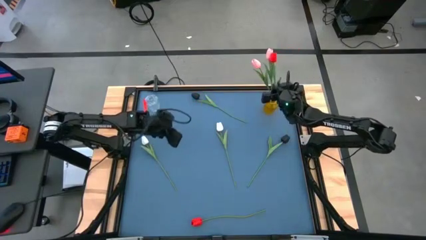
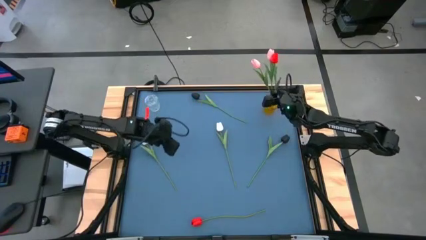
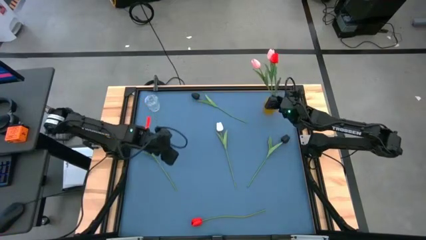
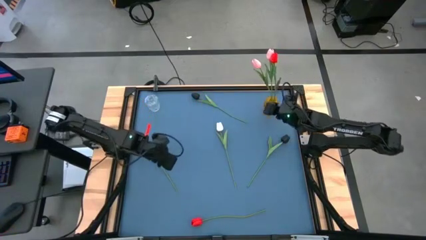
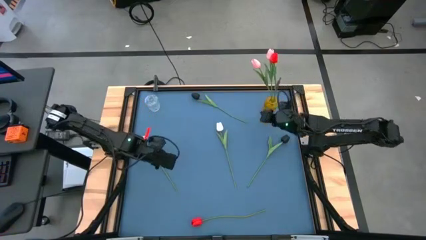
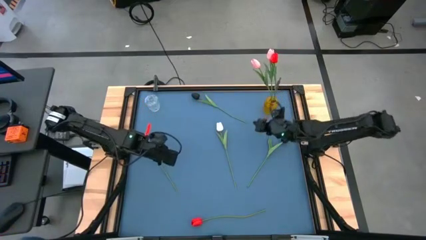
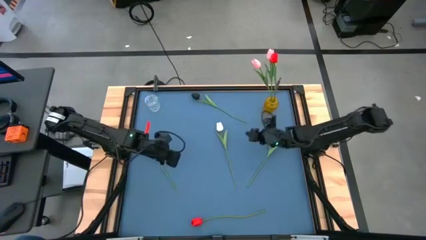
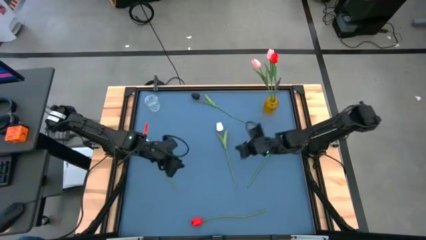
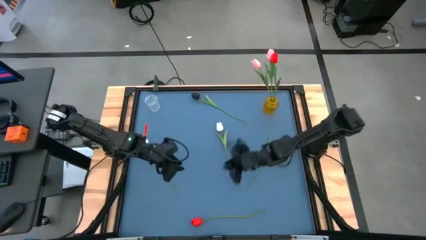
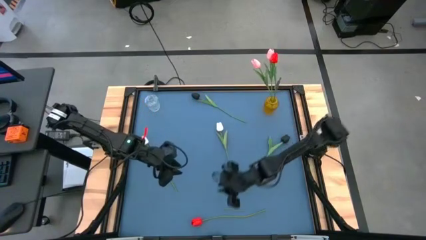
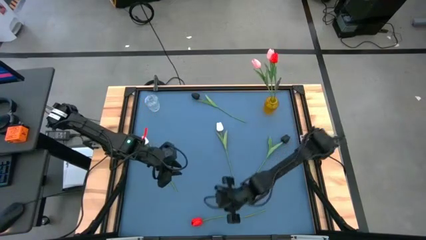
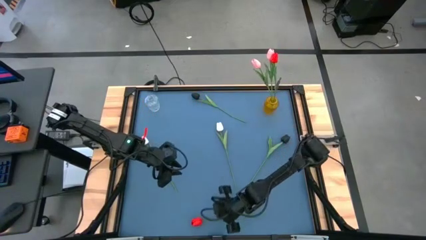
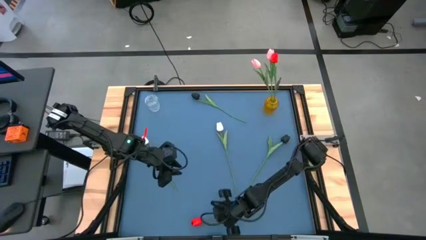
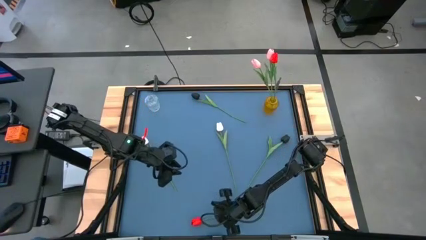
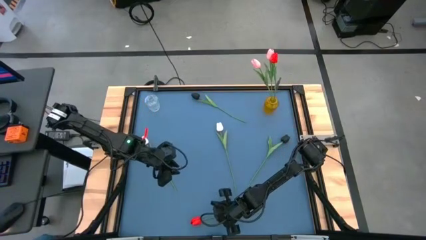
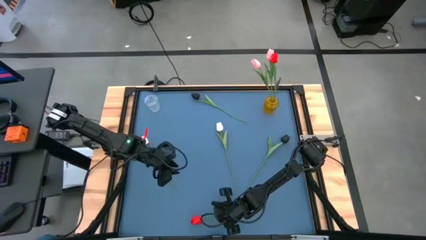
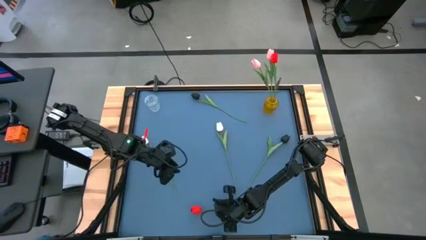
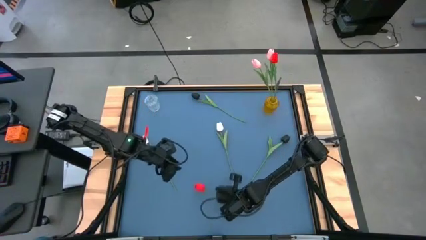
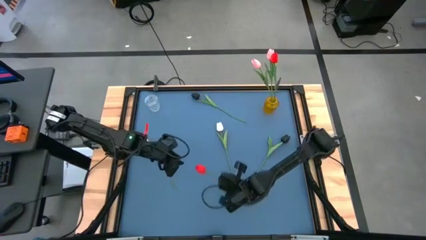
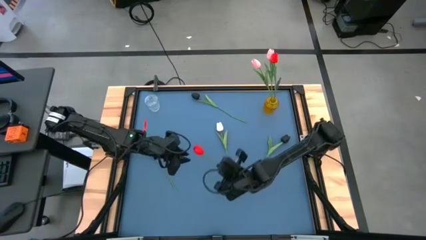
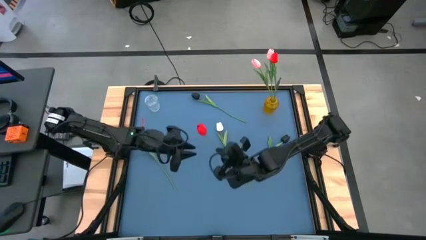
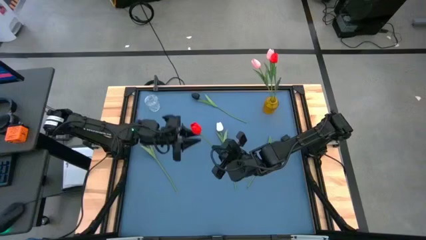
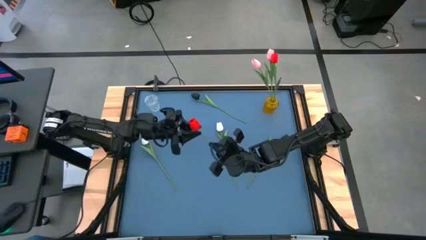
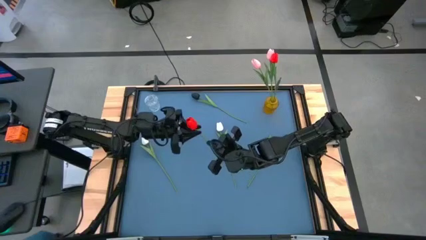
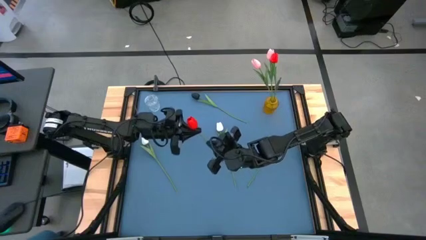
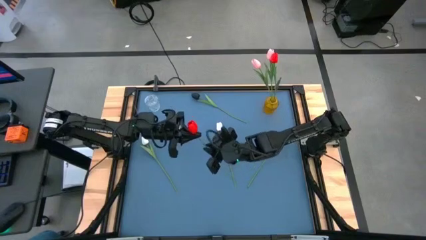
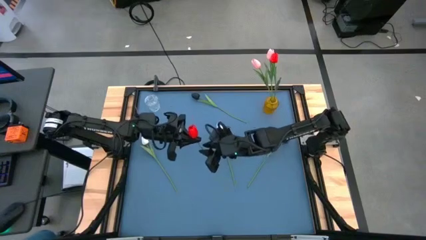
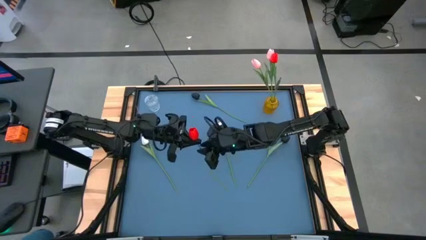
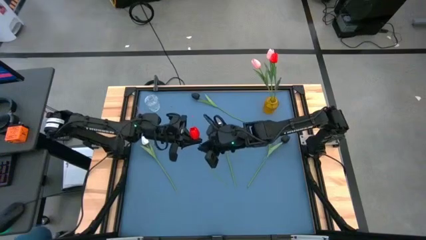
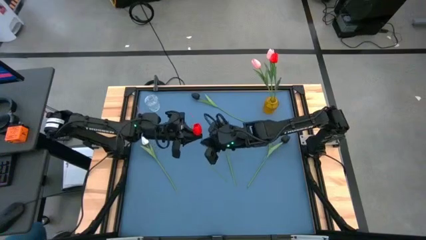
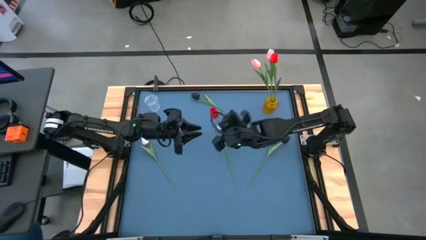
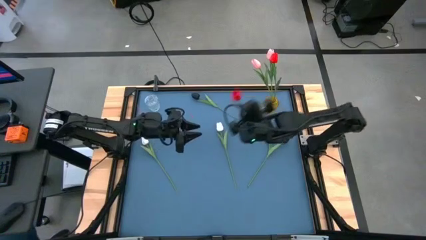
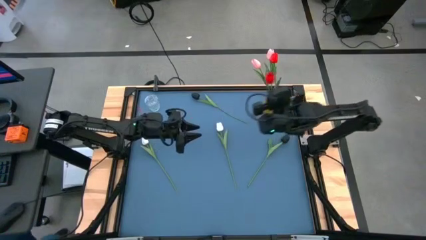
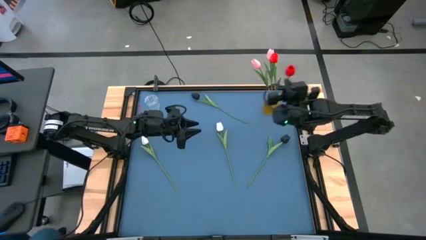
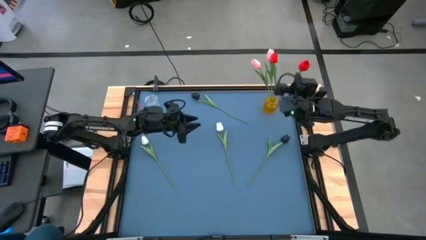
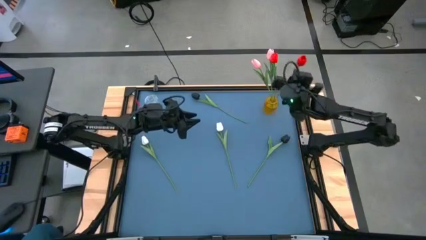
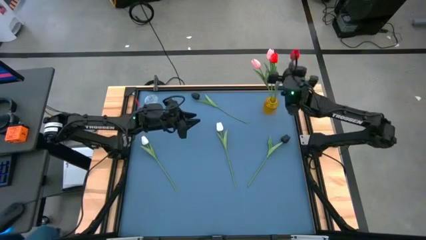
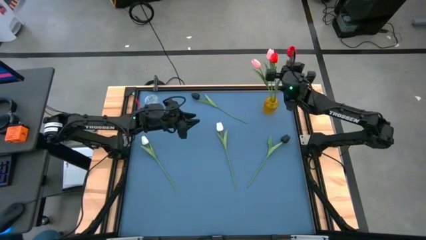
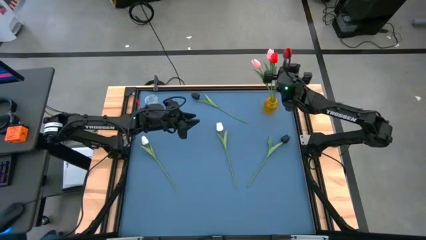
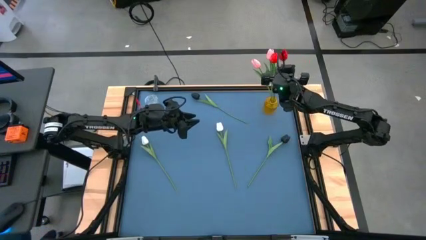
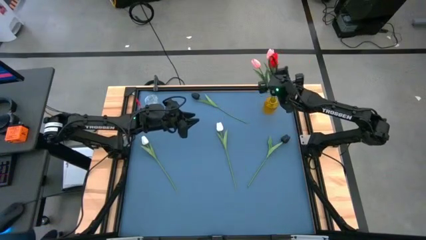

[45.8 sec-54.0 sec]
Task: Sort flowers into vase by color
Put the red flower into the yellow vase

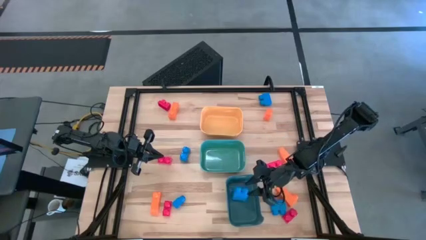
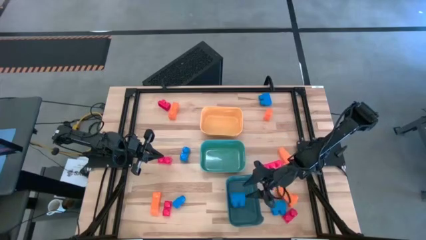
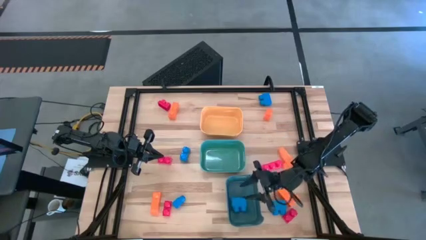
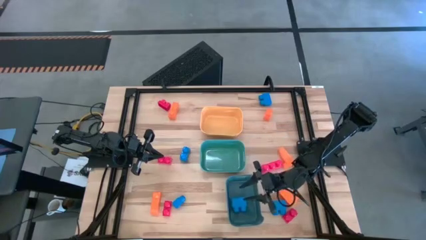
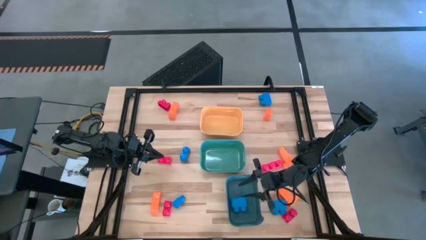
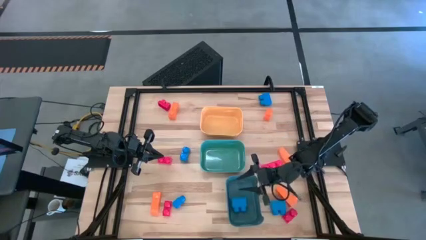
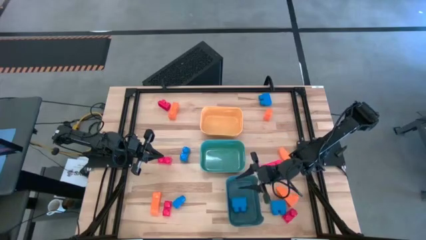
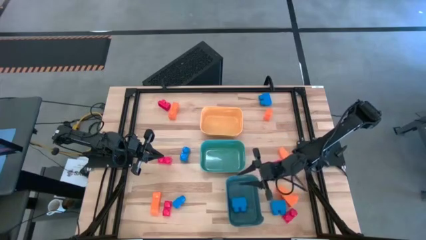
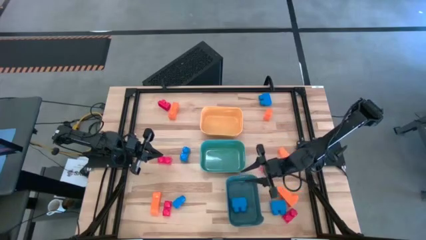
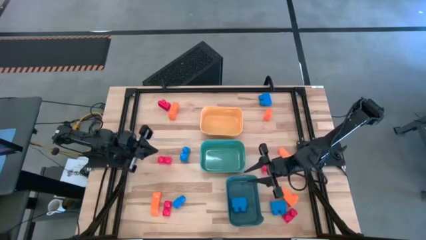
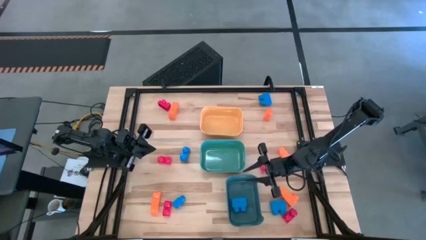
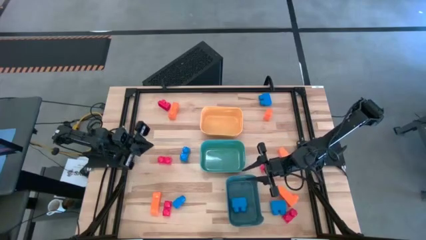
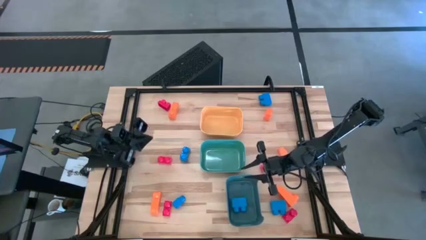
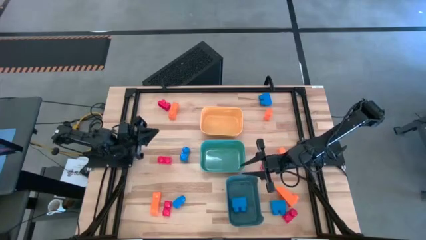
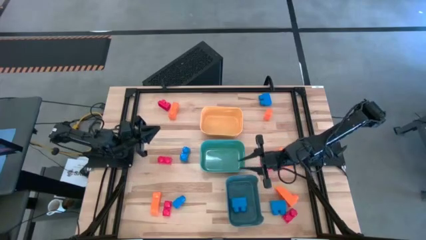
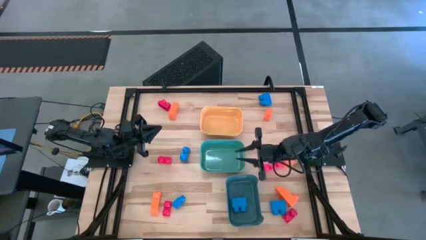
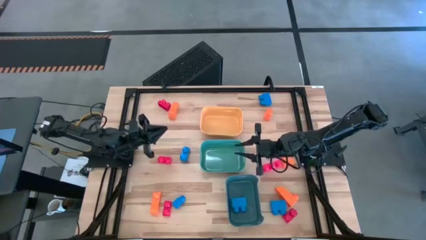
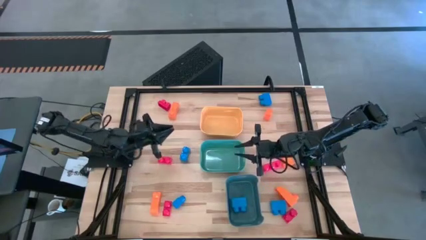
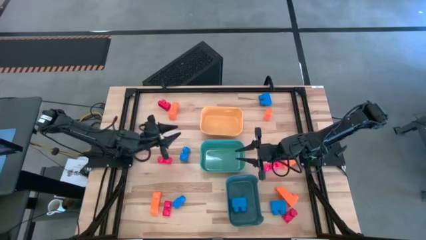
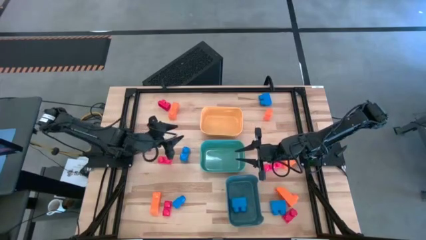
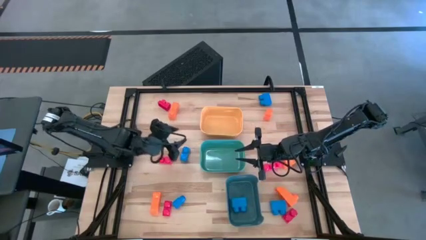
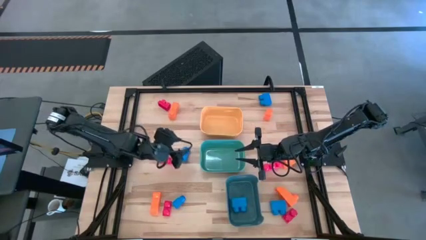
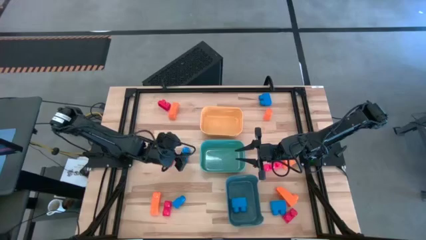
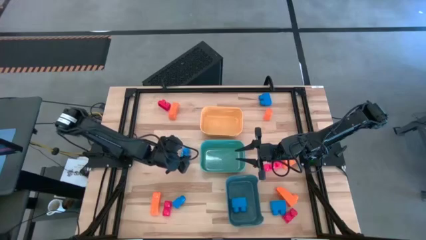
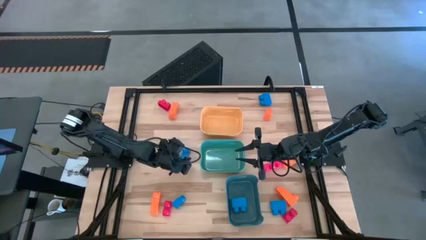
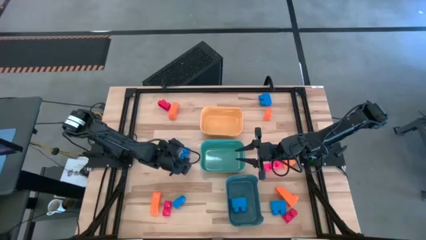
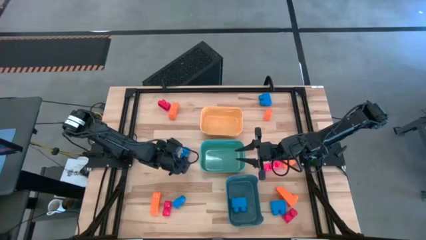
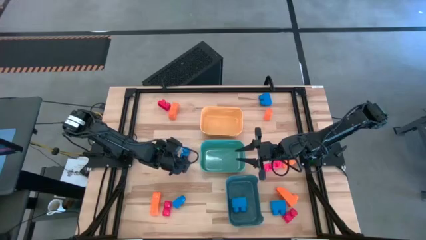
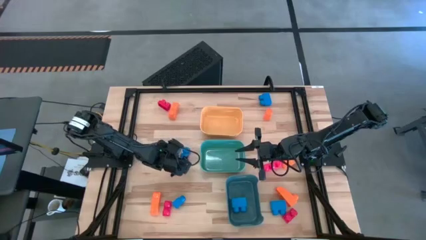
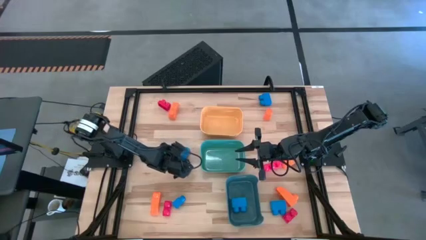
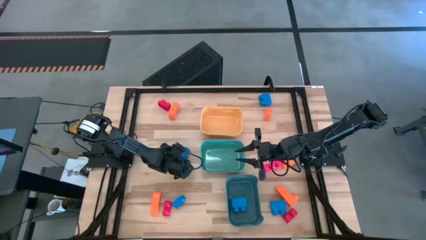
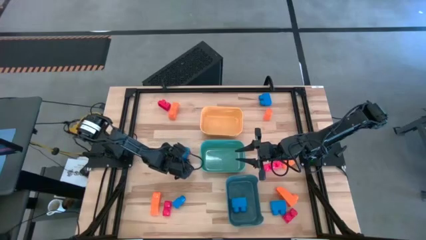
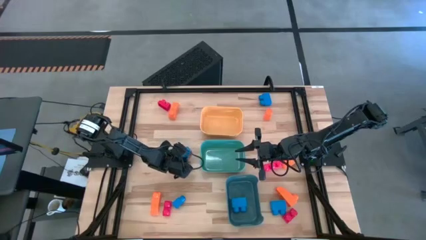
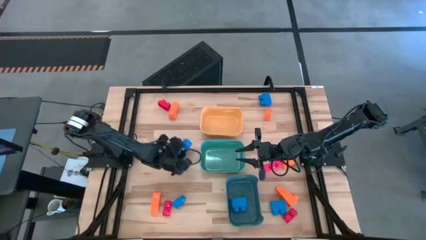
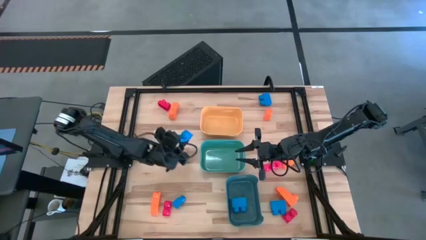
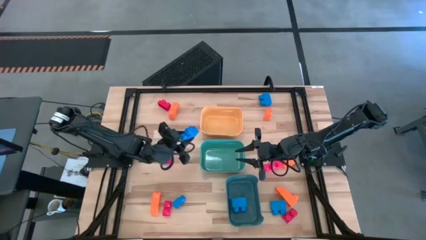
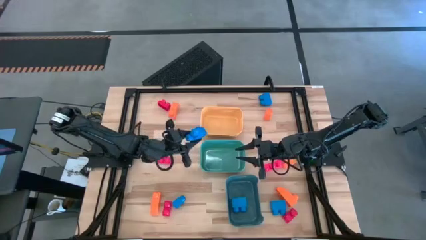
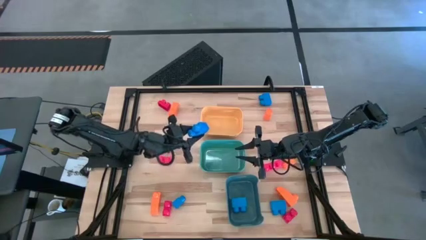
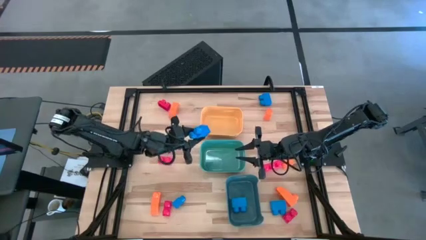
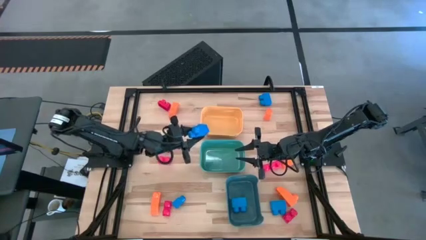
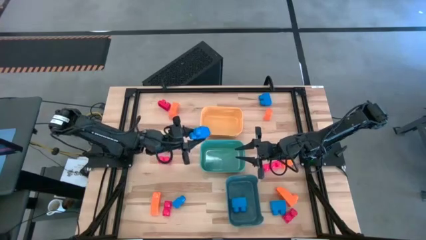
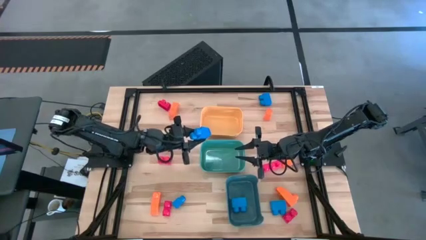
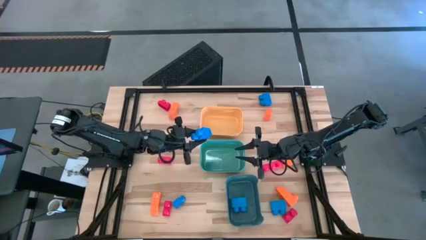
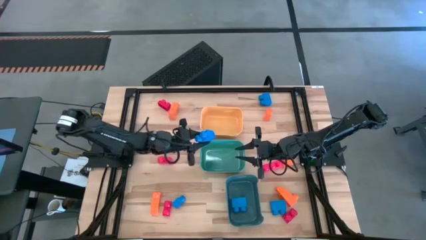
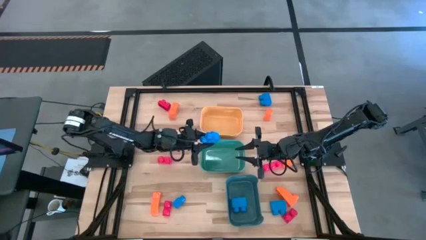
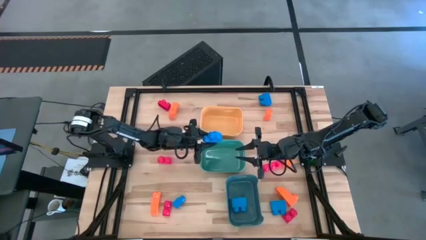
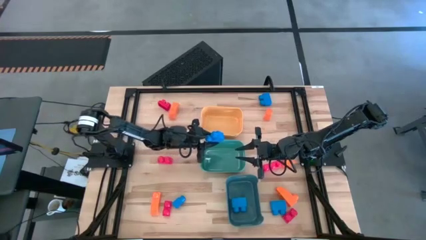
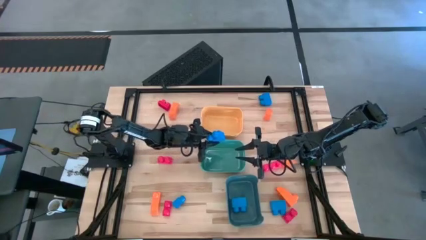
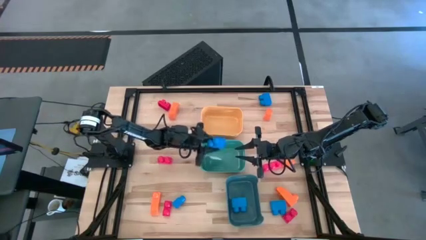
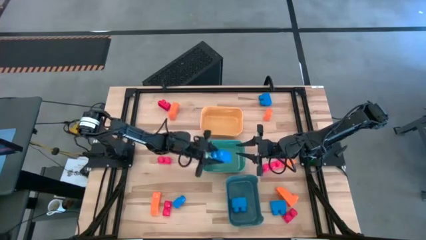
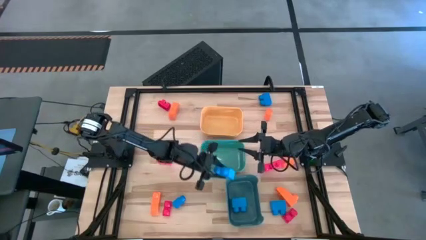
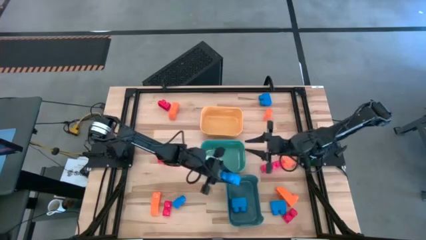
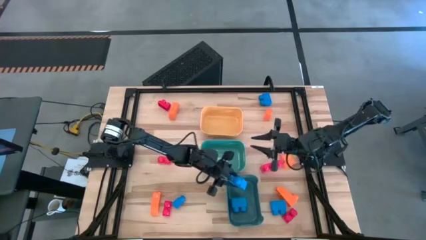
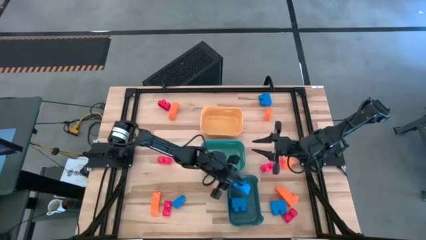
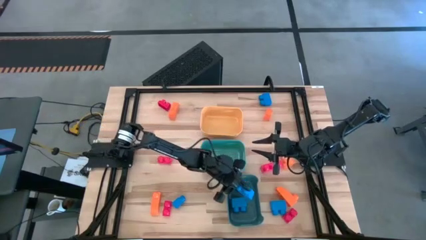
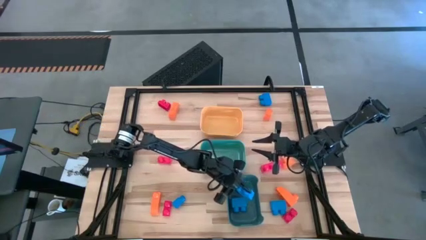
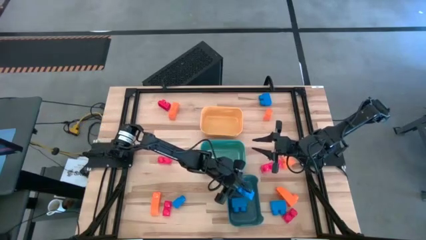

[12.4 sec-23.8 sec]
Task: Sort & place blocks by color
Put the blue game piece into the blue bin
